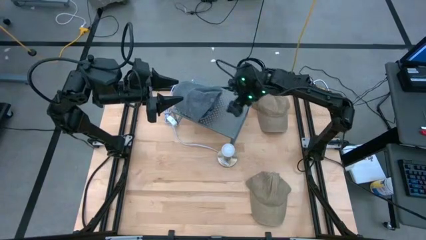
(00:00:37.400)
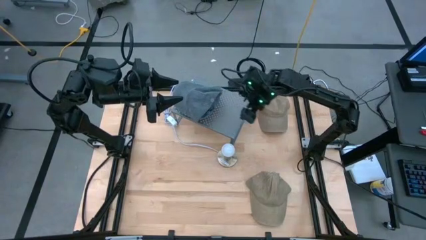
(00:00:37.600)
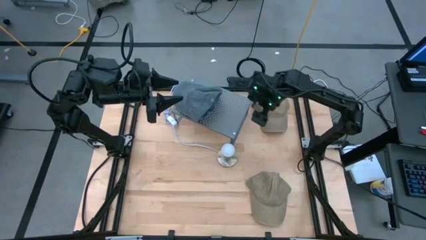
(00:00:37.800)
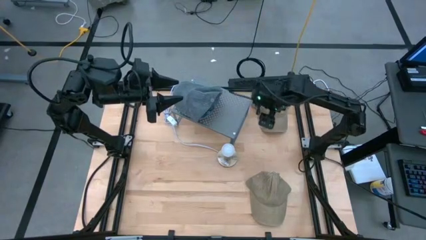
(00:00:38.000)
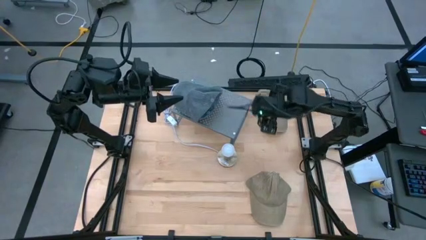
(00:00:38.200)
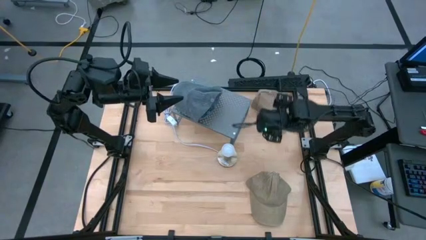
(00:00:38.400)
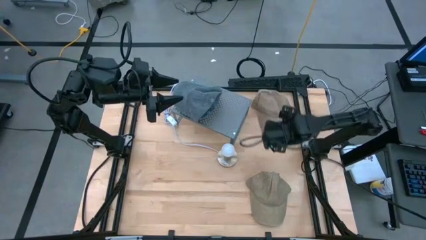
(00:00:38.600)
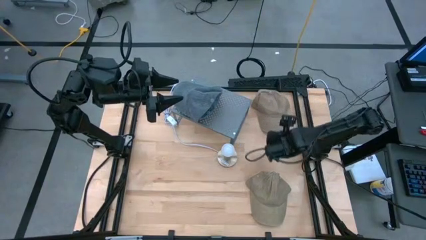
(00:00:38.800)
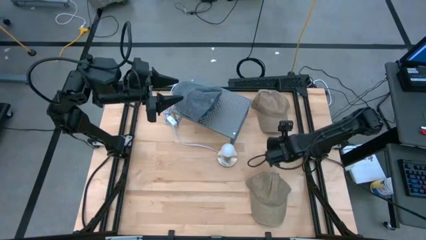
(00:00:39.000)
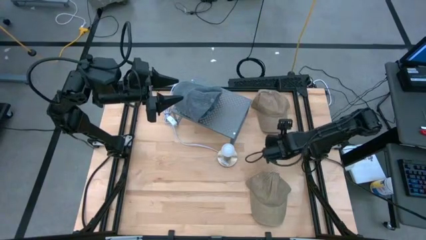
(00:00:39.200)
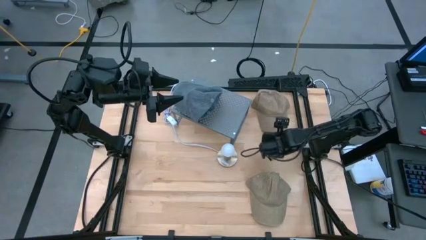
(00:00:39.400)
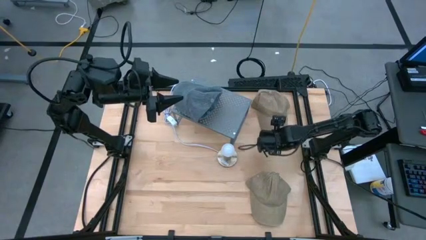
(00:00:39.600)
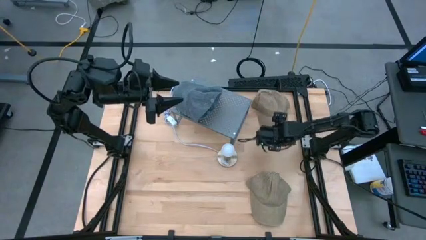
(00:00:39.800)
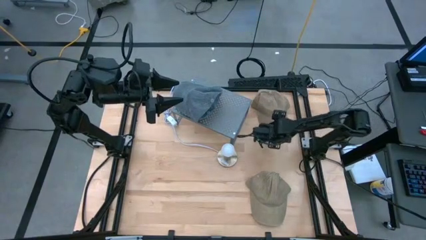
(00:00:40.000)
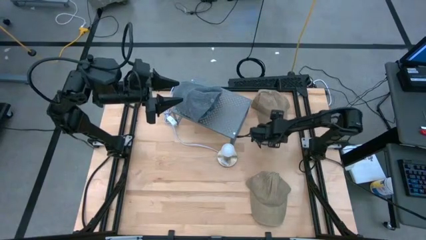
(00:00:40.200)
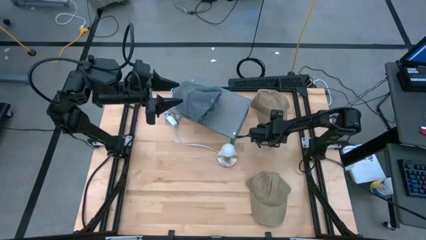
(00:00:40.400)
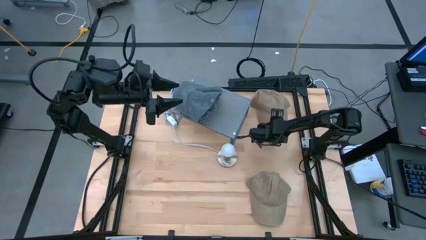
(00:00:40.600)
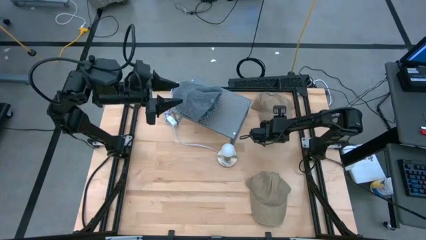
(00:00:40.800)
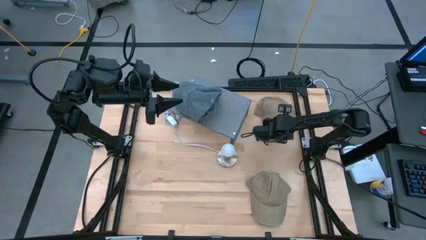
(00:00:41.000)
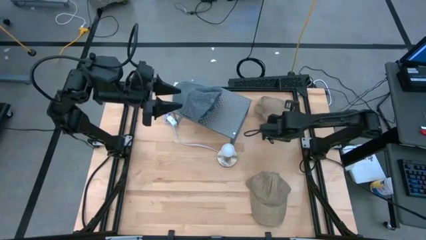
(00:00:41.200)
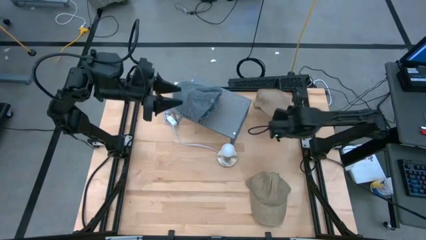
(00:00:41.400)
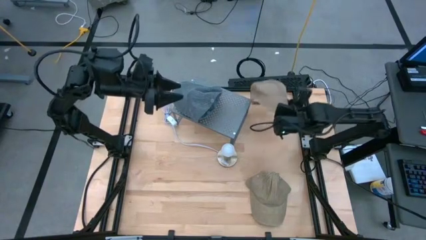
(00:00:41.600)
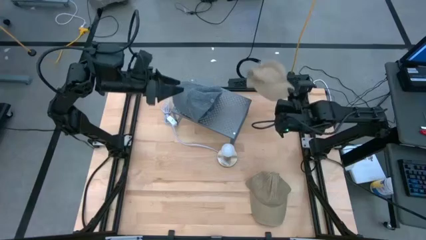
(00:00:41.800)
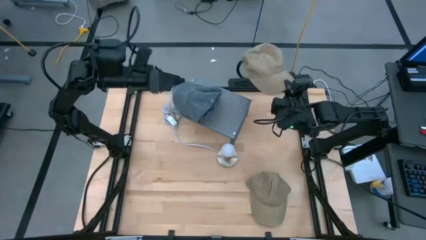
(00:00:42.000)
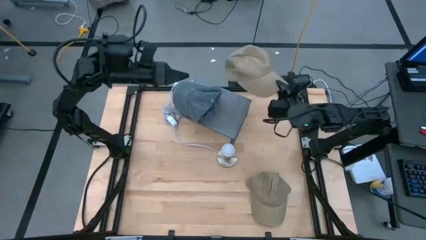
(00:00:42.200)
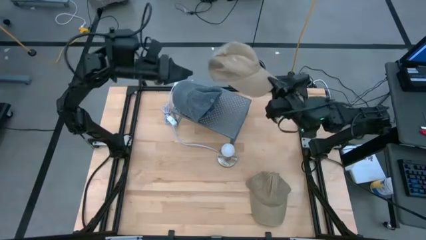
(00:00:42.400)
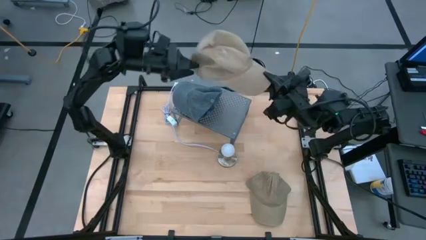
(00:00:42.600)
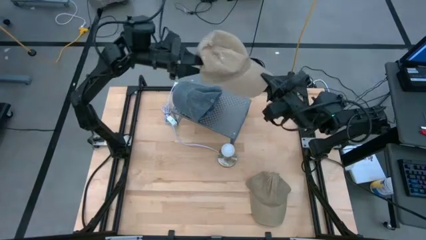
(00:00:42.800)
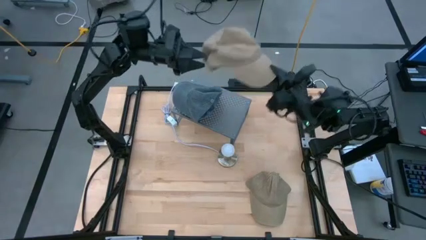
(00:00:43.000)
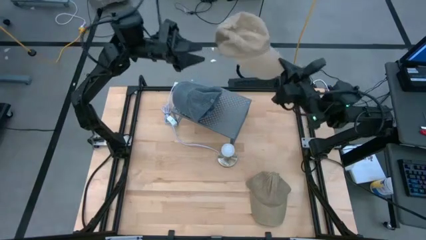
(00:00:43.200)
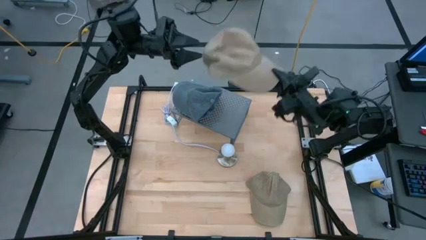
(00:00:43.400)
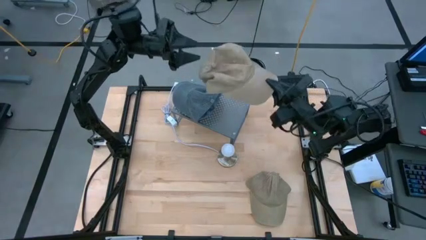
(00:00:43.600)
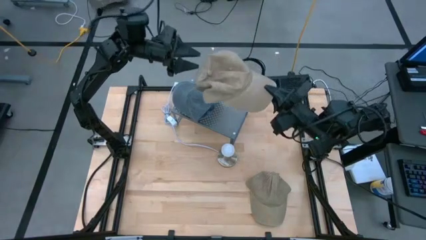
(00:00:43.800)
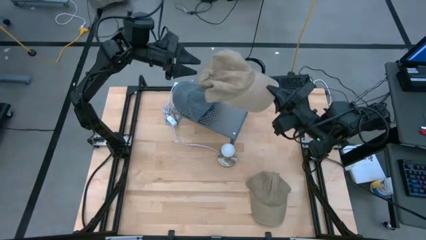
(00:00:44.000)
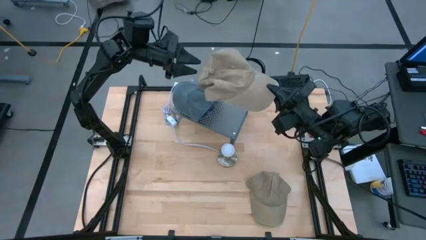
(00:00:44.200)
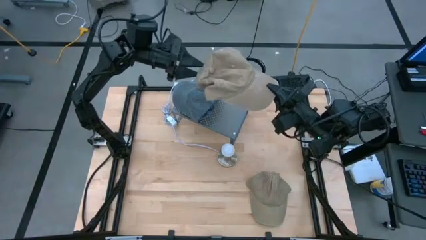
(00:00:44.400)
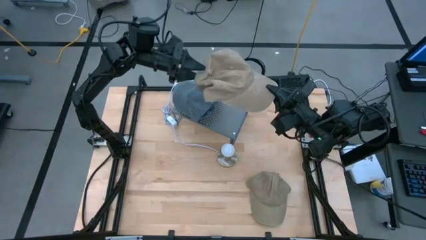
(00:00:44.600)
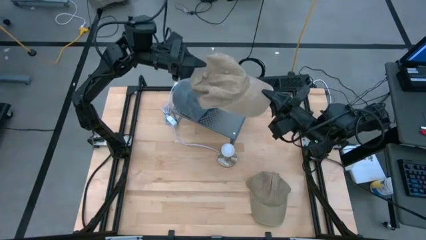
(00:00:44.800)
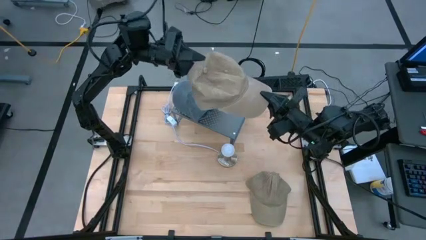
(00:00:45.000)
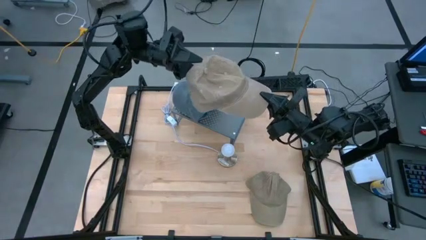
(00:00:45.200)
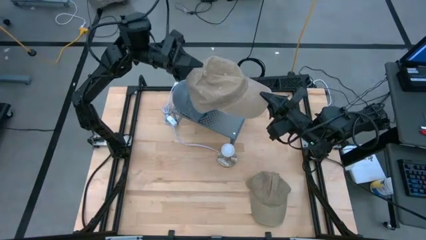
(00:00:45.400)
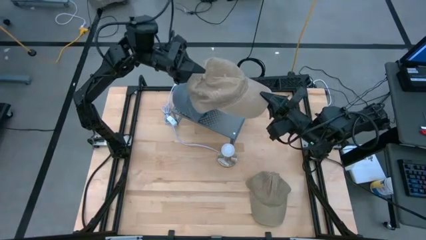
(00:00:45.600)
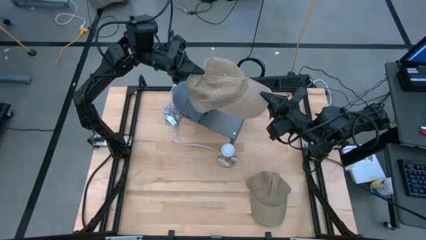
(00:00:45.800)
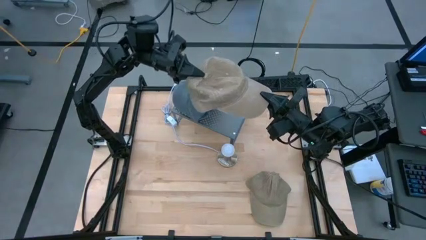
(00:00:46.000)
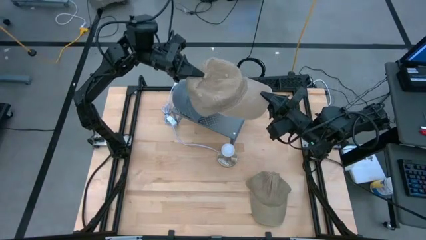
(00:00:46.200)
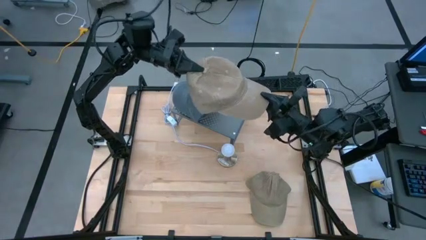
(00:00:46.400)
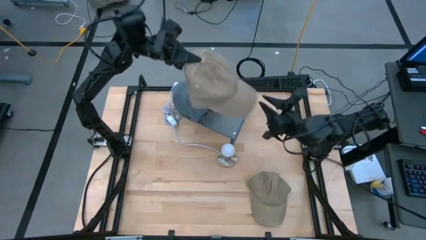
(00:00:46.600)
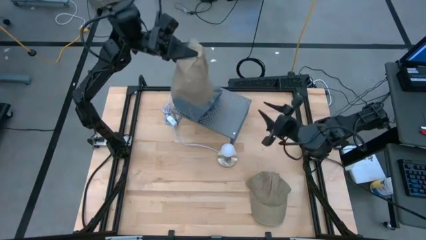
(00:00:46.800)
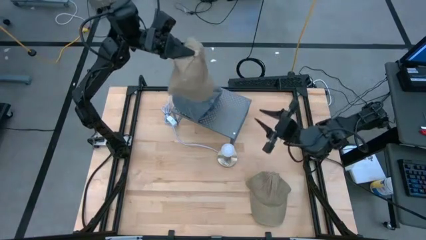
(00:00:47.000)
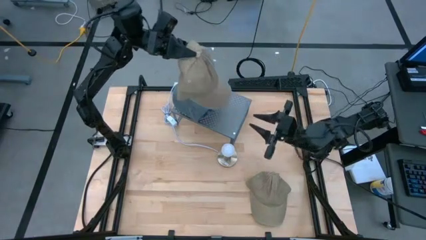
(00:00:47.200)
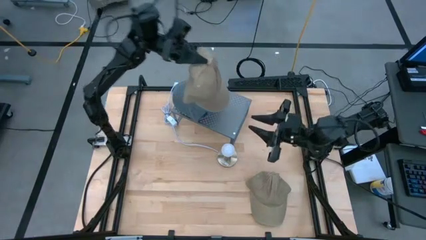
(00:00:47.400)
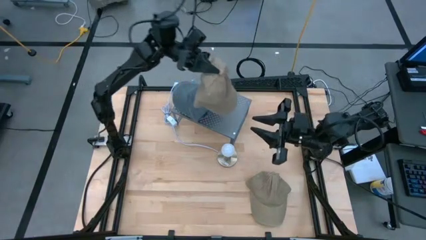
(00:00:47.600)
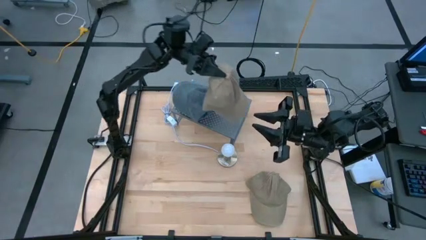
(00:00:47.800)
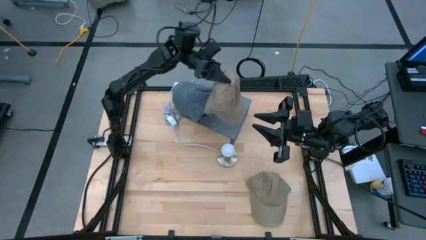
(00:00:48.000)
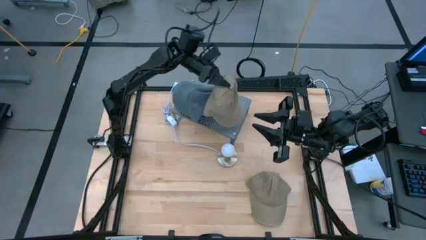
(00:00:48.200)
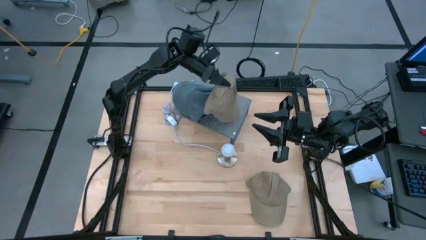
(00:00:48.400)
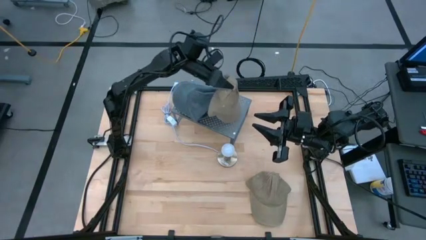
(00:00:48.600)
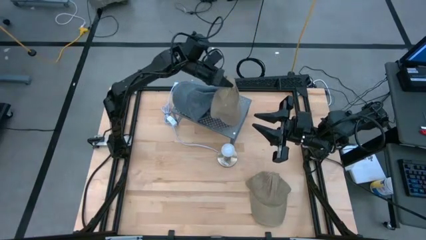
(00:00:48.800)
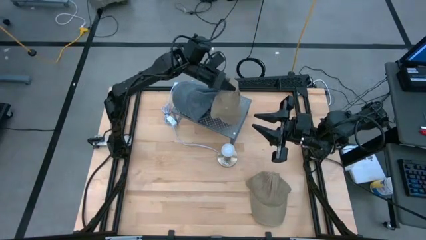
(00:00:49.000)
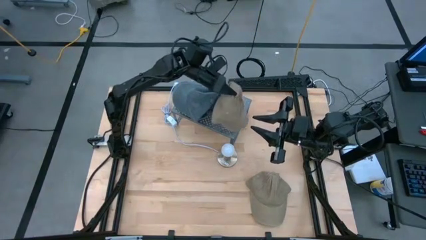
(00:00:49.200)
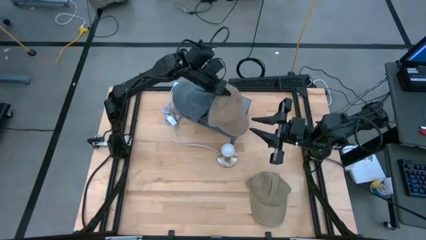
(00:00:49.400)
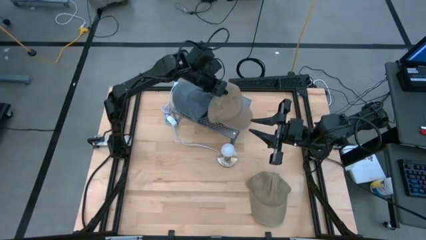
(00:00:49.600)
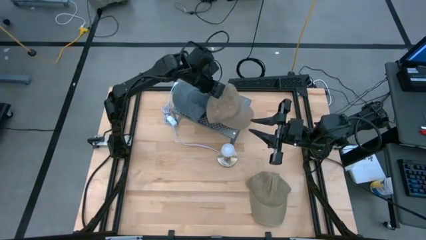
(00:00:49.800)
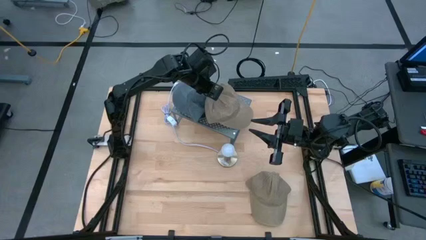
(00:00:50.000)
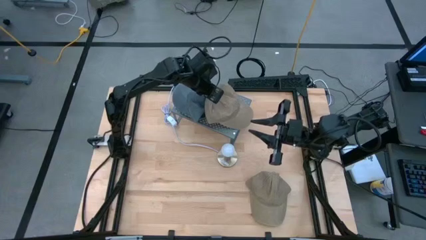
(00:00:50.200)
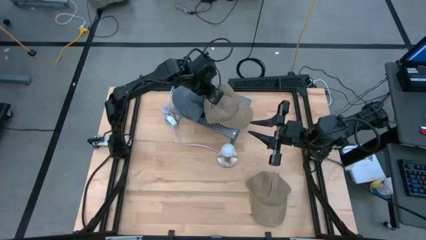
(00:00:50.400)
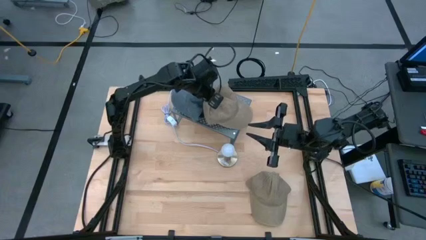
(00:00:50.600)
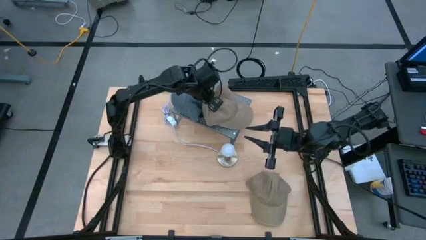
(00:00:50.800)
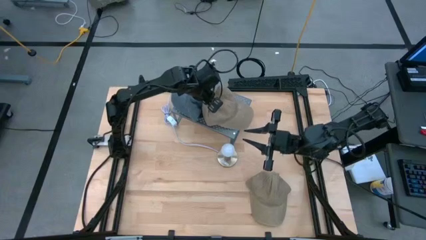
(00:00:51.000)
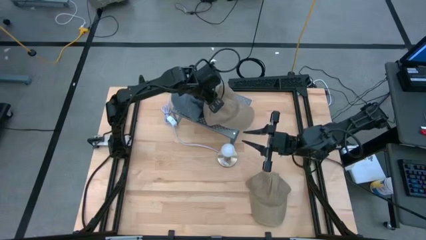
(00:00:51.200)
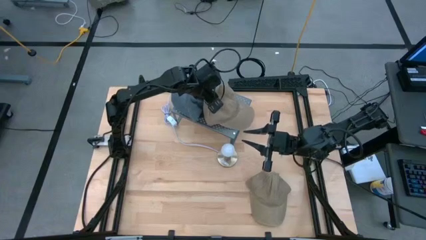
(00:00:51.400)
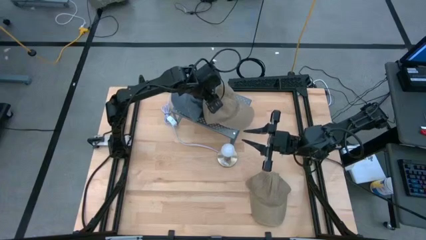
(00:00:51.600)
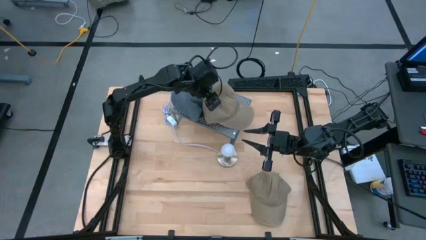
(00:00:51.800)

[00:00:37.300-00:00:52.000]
Task: Pick & Place hat
Put the top brown cap on the shelf

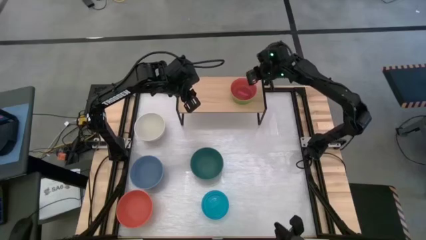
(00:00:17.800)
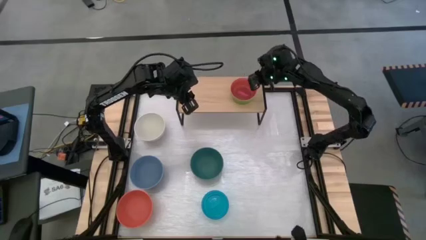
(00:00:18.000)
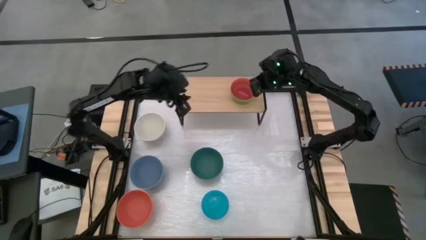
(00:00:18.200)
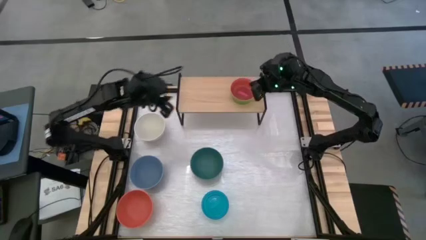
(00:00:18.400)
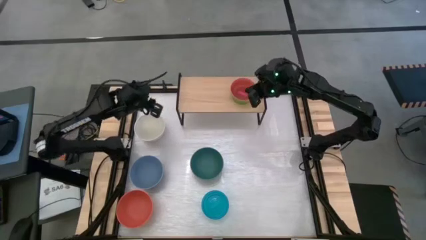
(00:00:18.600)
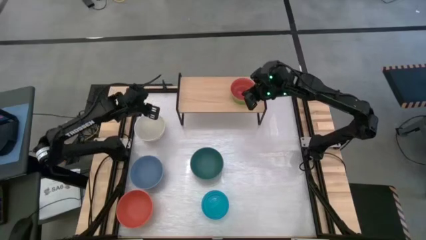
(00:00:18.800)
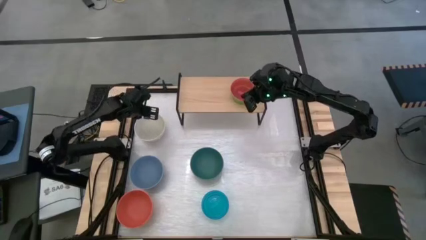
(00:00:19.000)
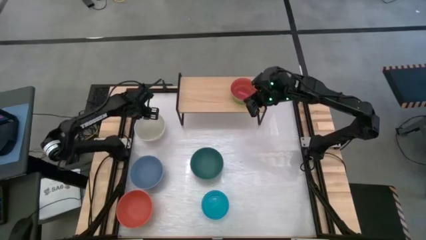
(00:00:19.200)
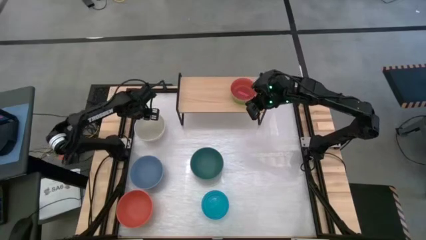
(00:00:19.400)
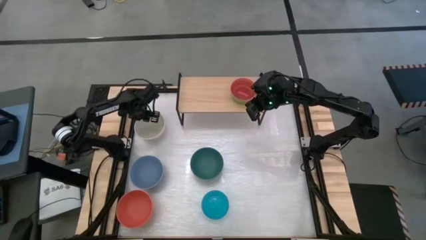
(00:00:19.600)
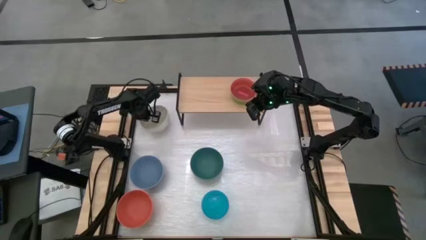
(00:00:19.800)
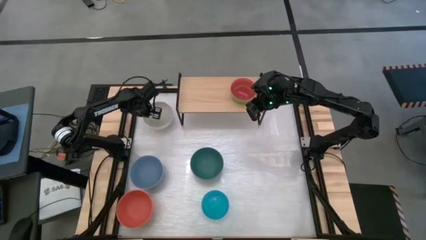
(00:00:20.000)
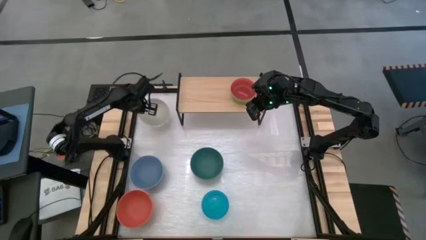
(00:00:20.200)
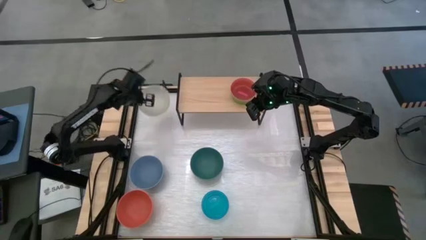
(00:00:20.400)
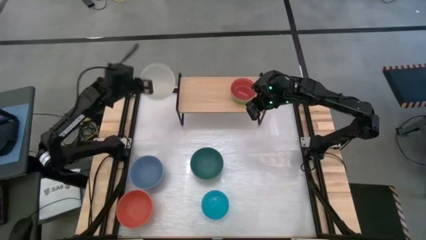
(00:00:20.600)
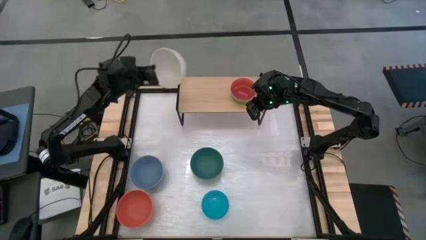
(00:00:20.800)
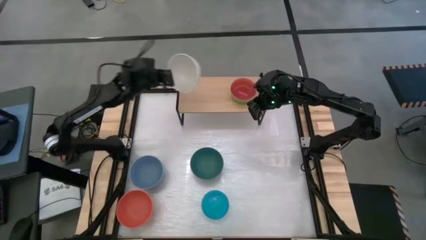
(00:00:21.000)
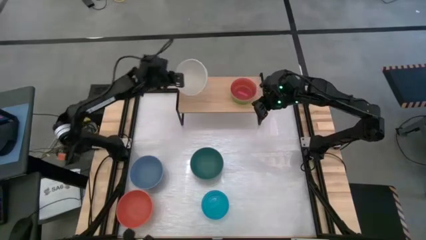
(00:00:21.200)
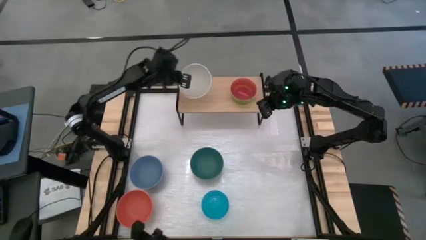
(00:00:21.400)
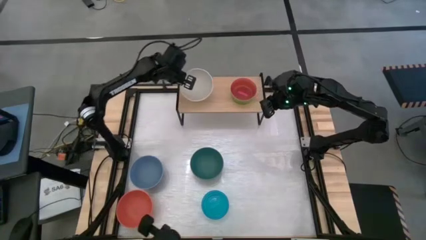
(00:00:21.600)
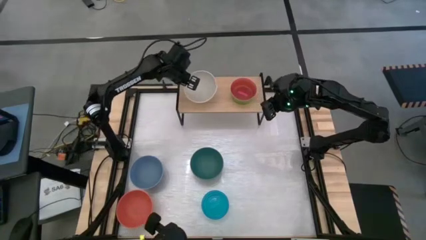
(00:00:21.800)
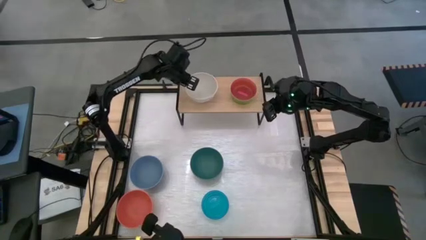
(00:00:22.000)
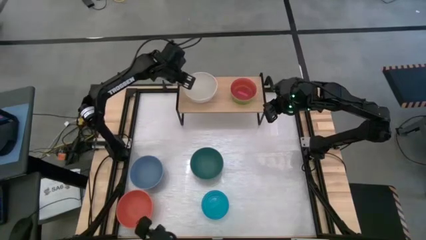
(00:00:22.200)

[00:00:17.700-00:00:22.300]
Task: Place and stack bowls onto a shelf
Put the large white bowl on the shelf
